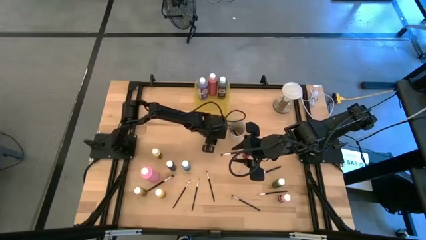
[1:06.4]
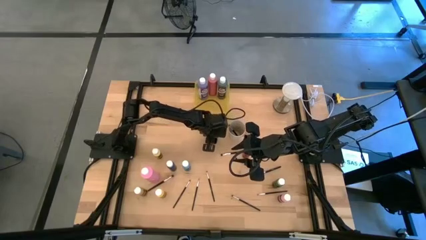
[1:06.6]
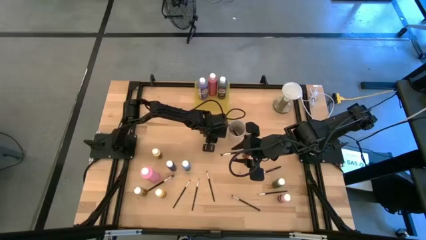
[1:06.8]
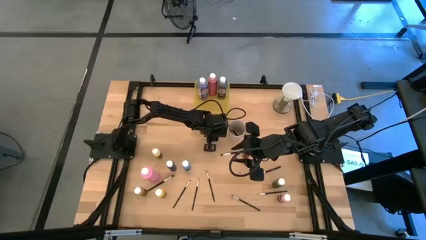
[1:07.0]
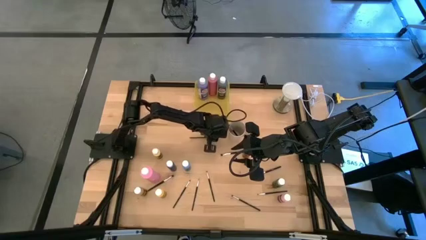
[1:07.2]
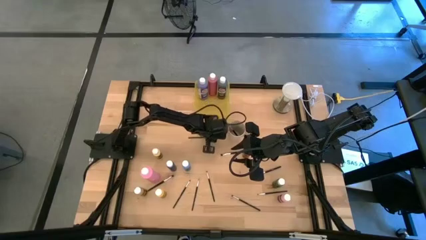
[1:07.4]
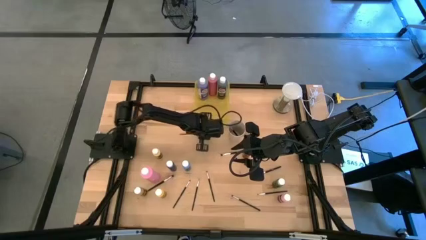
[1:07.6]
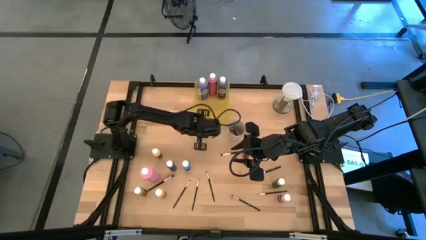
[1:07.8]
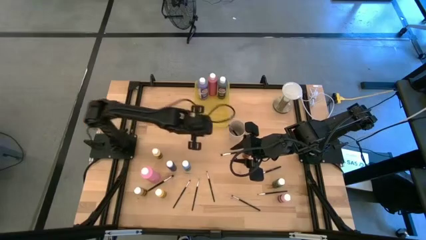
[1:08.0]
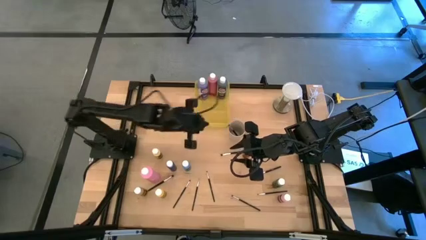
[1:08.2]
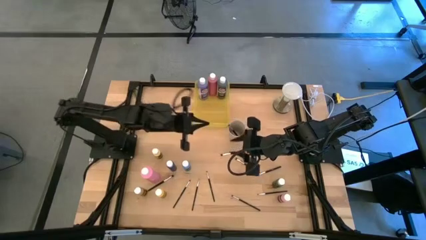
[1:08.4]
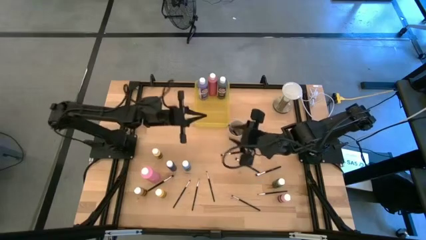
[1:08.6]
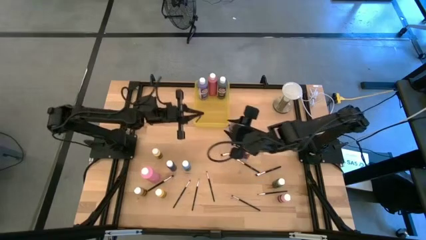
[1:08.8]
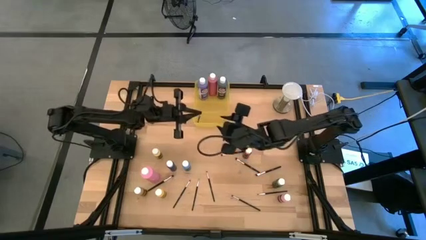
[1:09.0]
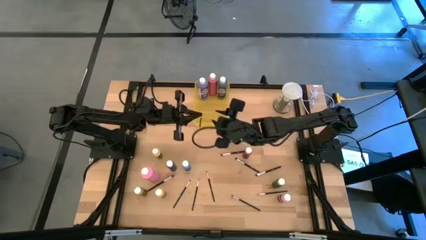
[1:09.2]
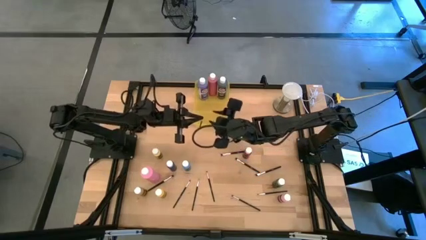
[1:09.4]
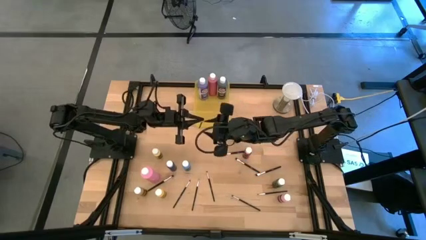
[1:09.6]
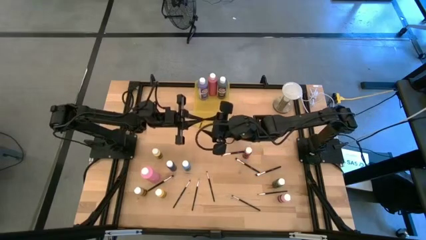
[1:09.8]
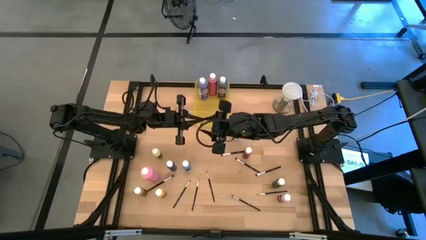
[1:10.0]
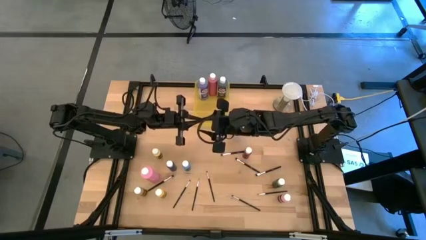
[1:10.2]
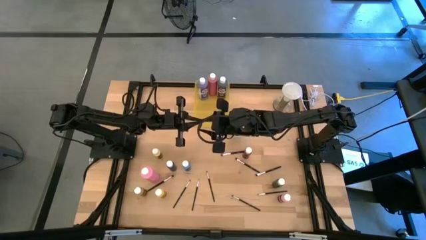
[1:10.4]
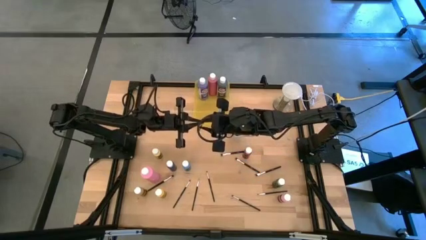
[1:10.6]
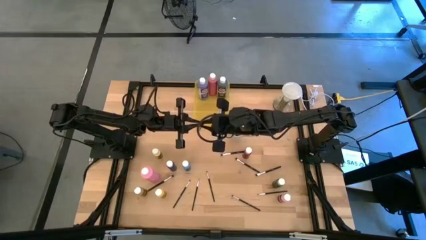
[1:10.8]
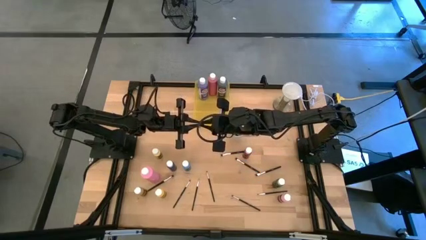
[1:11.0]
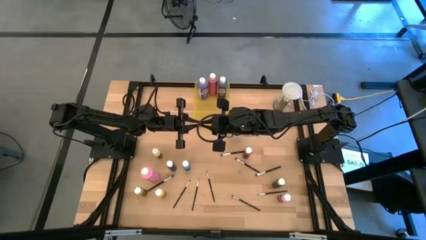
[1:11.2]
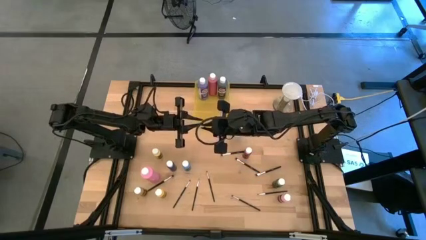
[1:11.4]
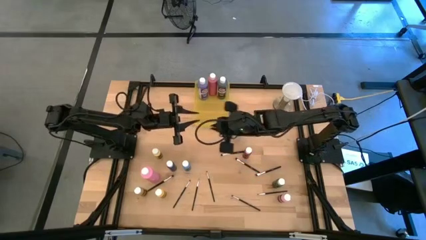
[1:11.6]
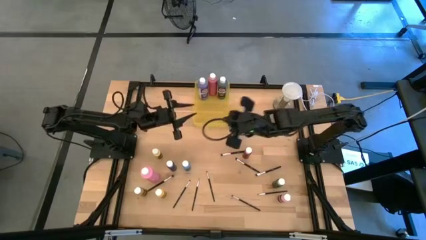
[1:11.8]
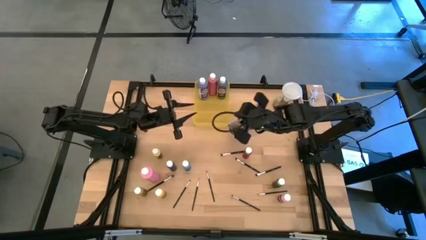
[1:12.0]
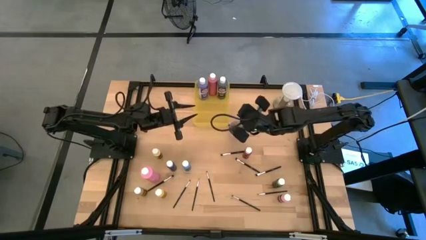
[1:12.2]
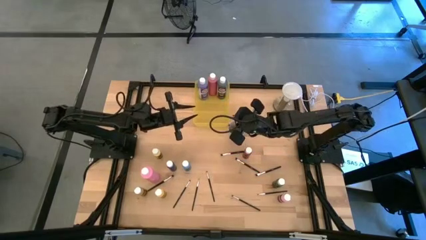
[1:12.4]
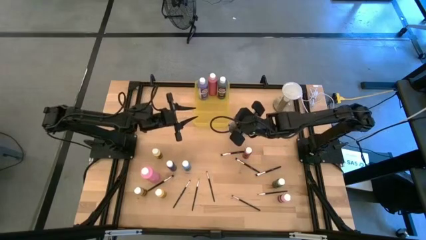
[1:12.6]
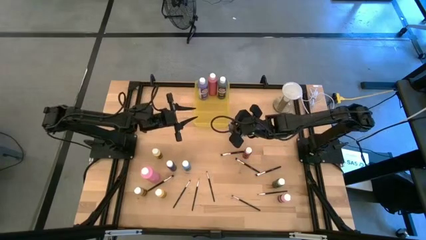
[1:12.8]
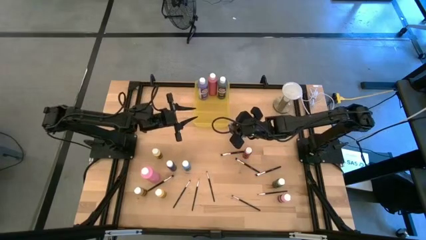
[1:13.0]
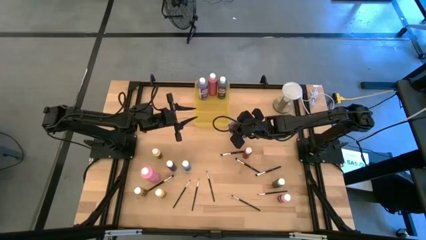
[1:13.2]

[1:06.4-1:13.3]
Task: Pick & Place Paint Supplies
Put the black paintbrush into the white cup

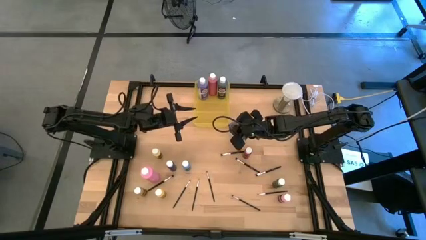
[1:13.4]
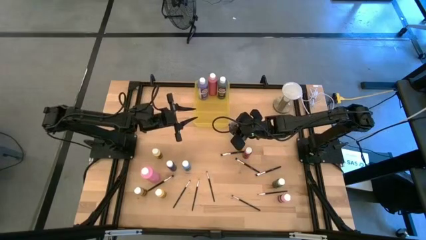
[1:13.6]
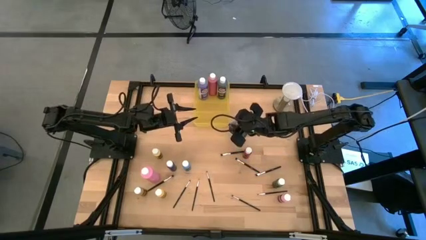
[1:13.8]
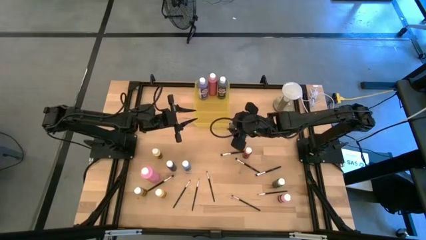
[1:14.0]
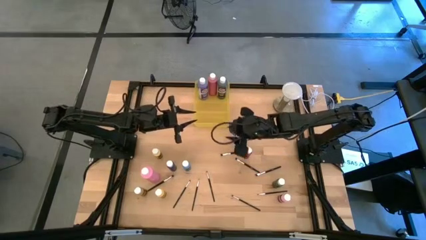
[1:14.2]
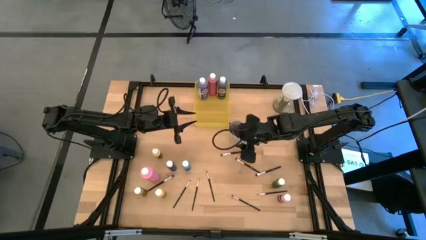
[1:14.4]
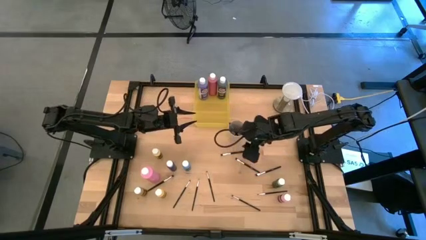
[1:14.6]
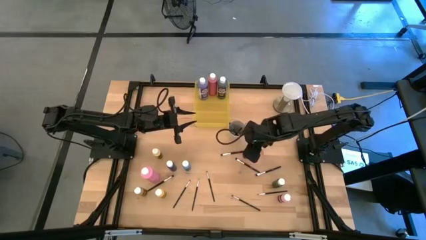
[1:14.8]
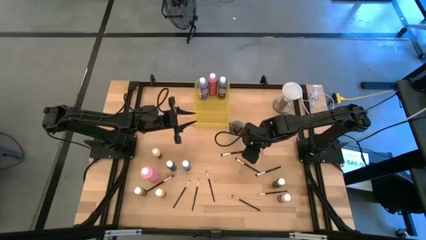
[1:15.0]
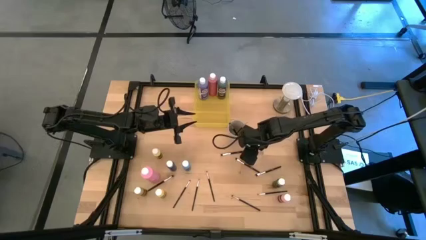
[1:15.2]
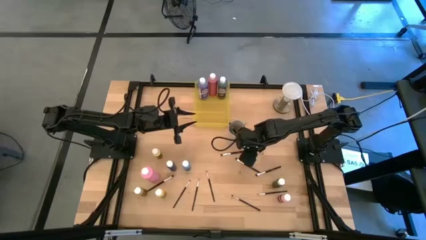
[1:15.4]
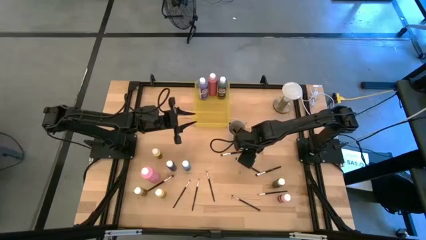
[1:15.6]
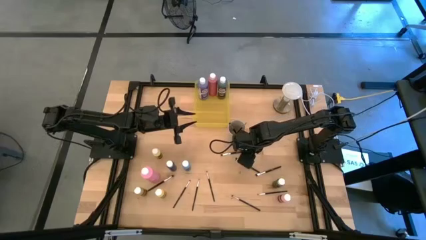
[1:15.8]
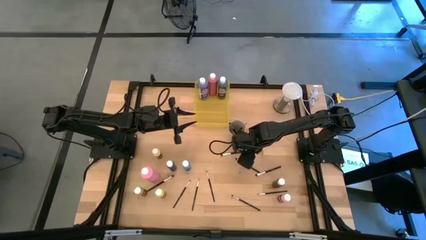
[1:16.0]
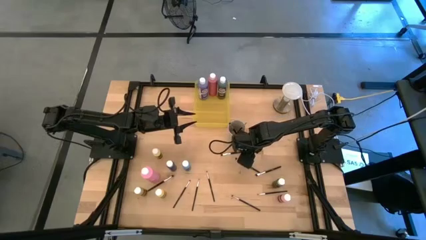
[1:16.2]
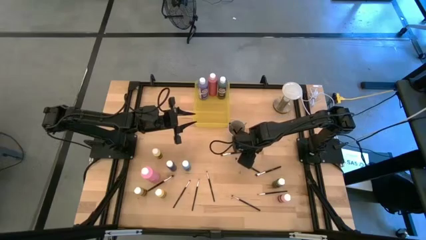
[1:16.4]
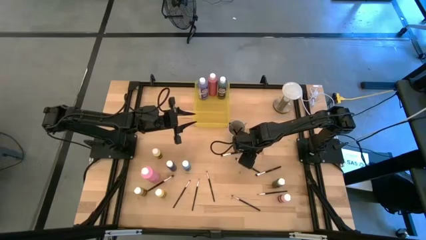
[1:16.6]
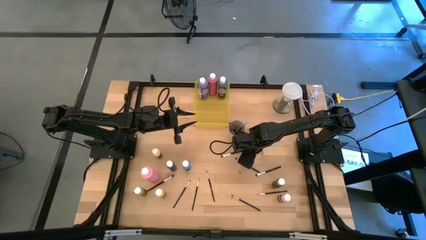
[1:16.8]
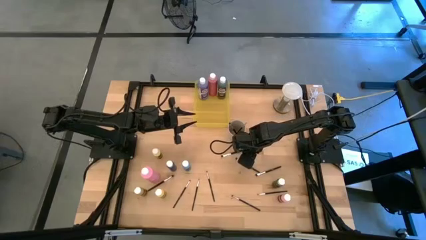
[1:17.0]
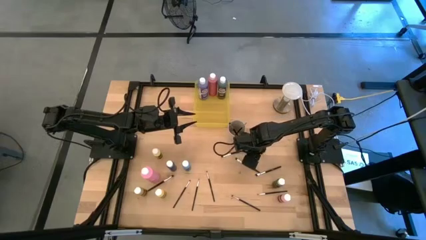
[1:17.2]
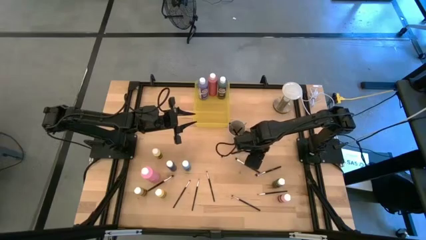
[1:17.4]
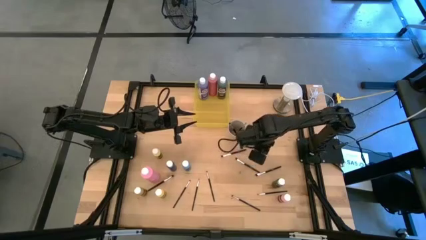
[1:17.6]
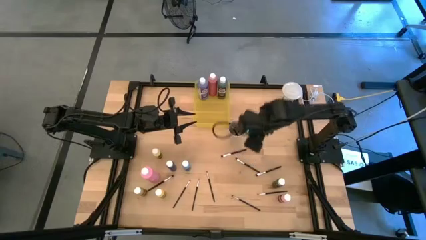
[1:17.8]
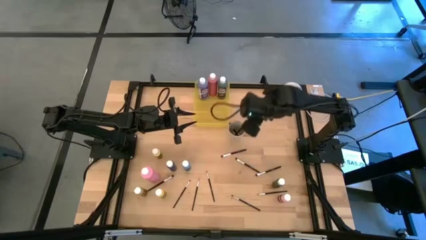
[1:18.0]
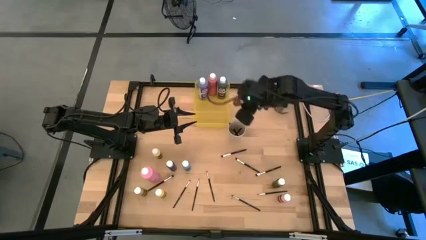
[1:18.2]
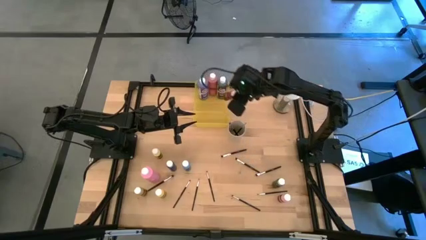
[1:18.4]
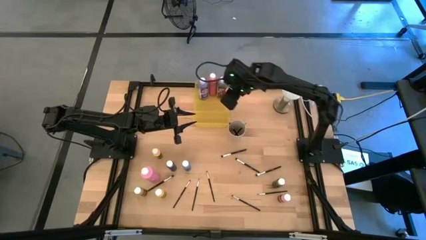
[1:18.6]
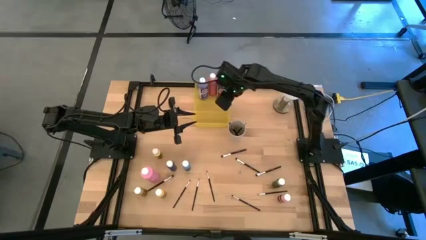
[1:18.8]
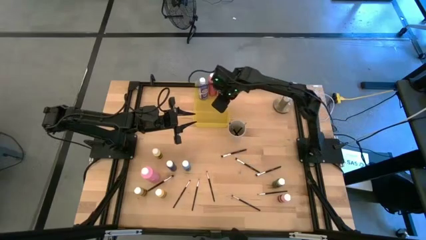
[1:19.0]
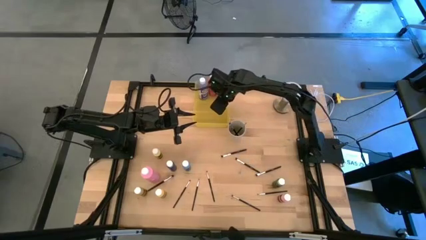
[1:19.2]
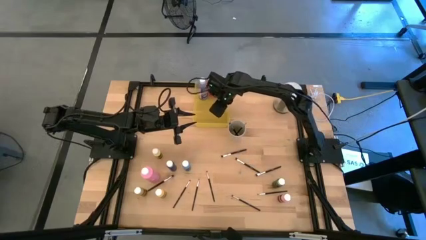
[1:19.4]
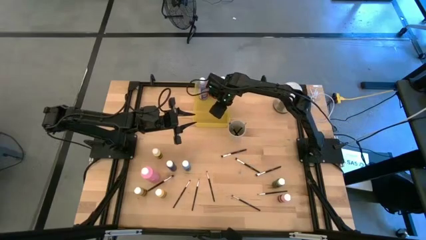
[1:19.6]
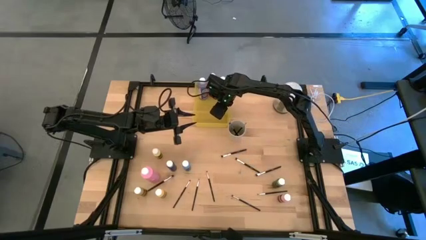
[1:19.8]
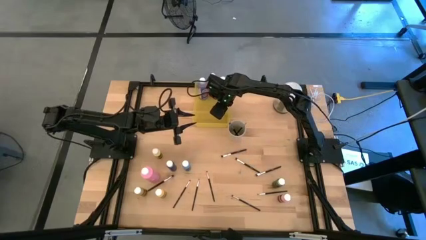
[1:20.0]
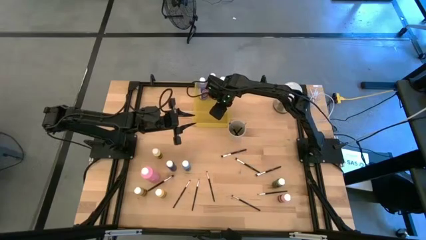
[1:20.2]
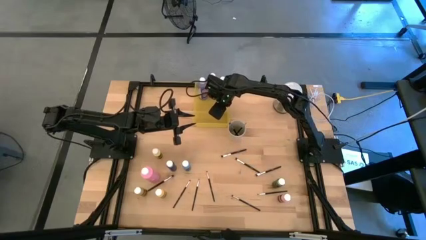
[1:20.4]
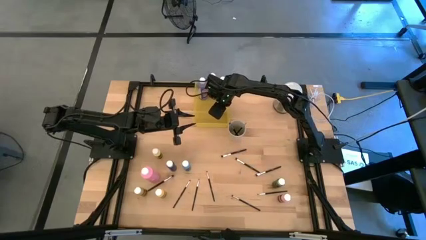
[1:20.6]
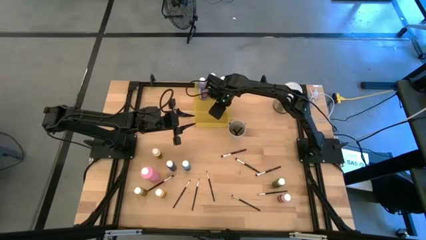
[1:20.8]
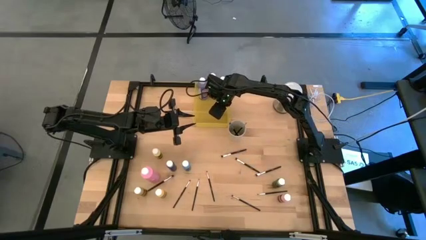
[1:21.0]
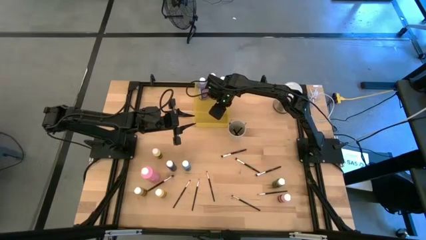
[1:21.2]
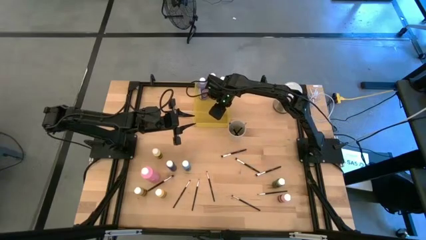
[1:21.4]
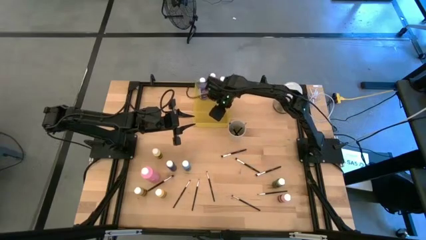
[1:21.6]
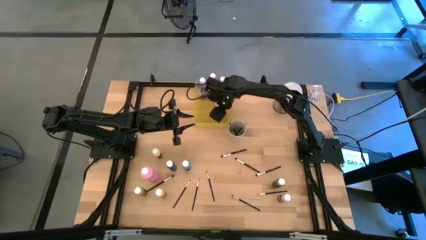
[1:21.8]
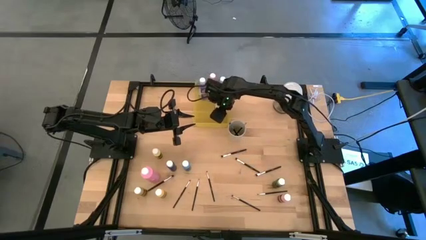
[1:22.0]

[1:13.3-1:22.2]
Put the small red paint bottle into the yellow bin

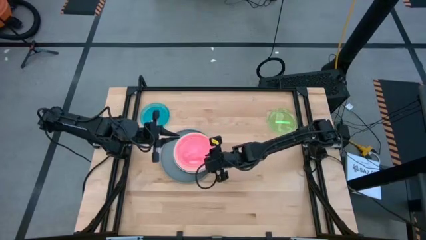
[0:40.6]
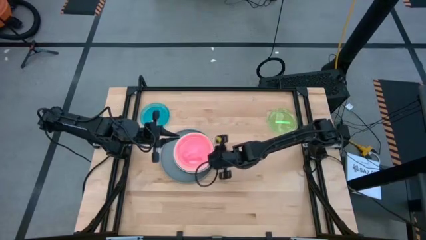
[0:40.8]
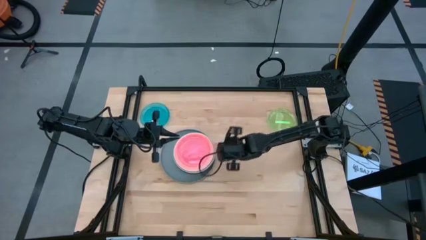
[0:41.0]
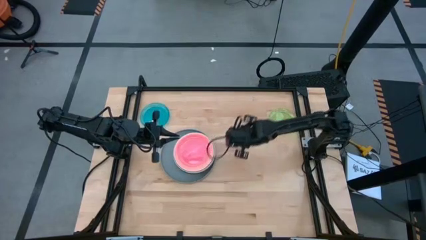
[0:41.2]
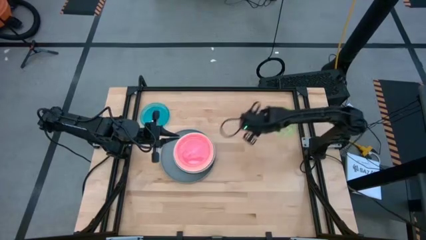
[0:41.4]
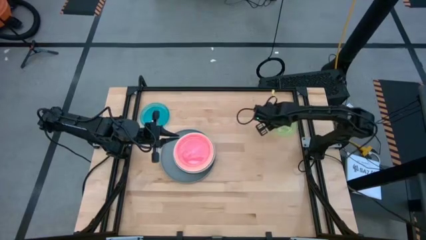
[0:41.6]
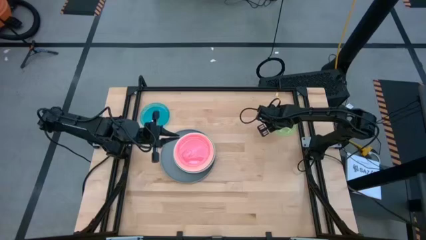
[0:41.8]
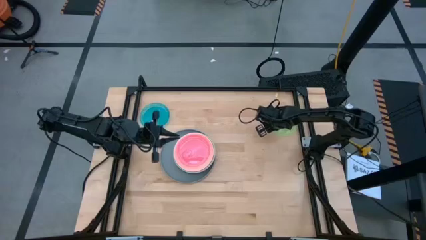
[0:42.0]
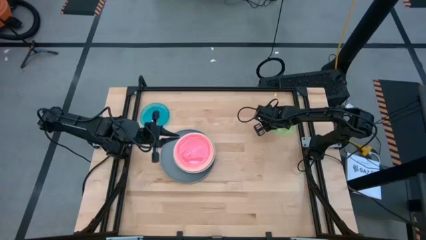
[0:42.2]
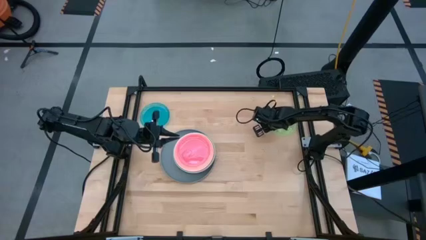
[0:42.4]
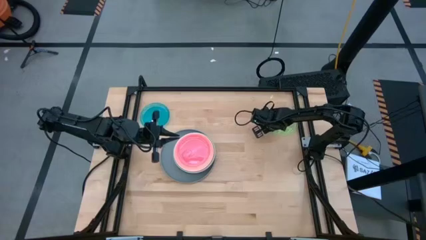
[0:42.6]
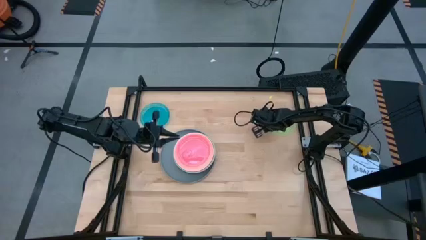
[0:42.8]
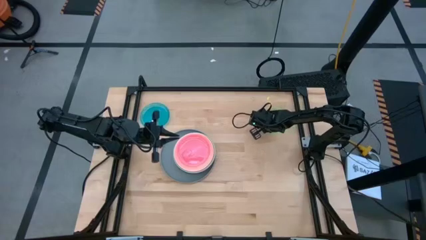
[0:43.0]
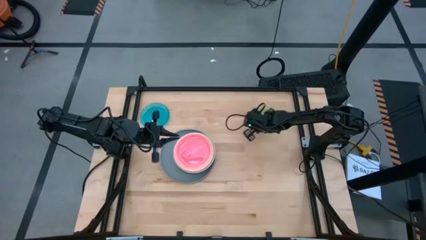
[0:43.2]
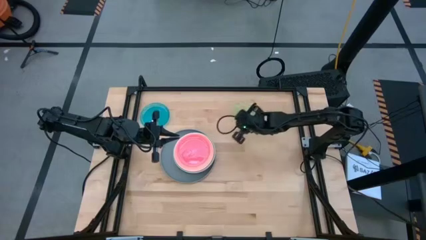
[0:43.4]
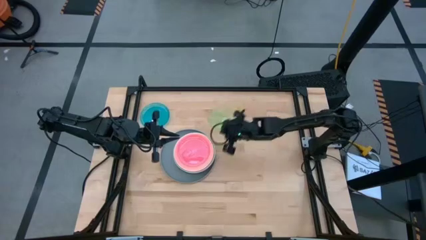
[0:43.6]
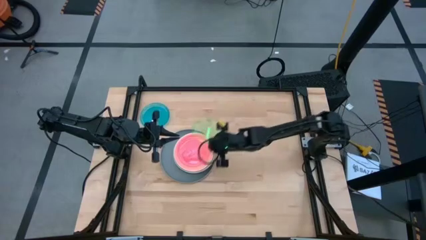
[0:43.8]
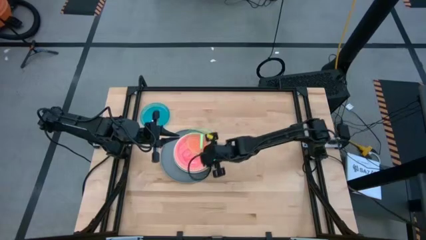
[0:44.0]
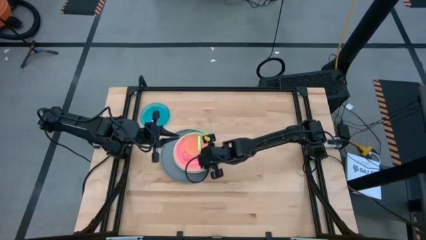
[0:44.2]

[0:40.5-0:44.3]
Task: Stack plastic plates
Stack the green plate on top of the pink plate
